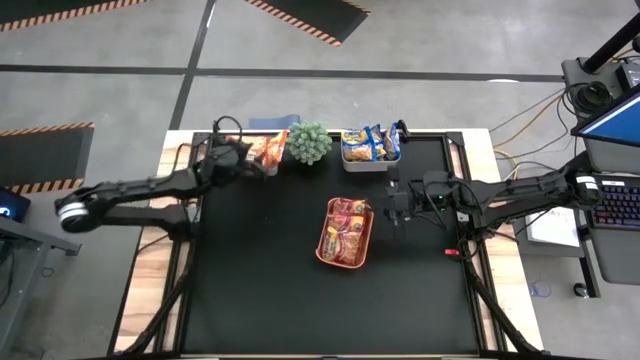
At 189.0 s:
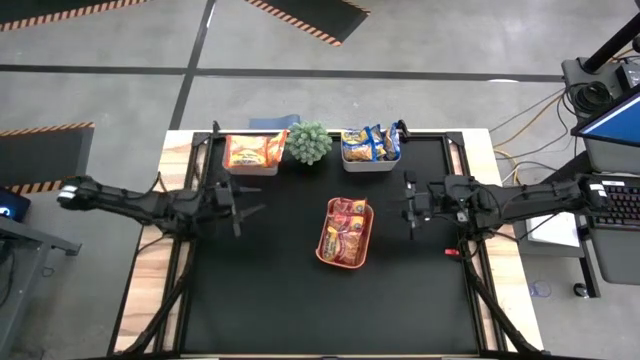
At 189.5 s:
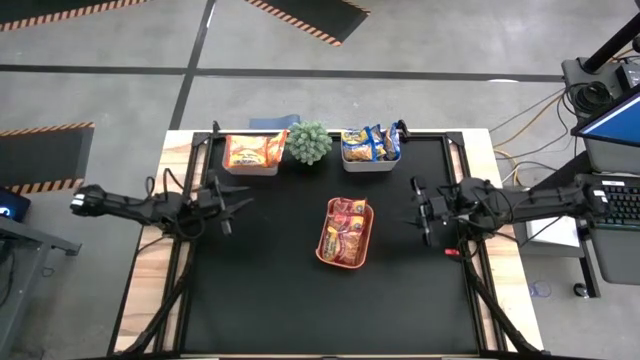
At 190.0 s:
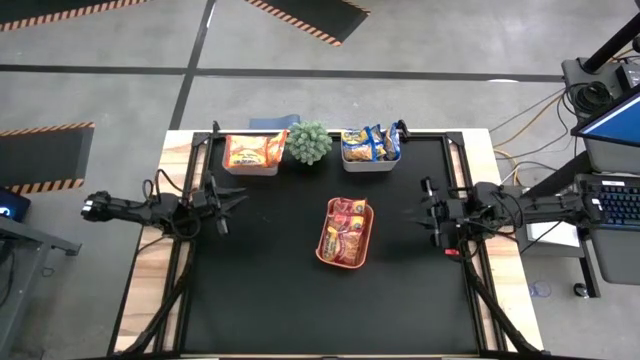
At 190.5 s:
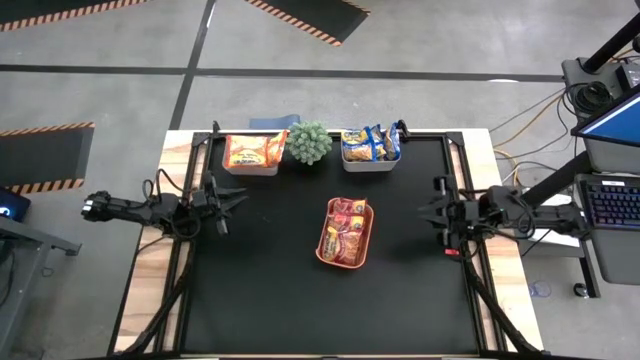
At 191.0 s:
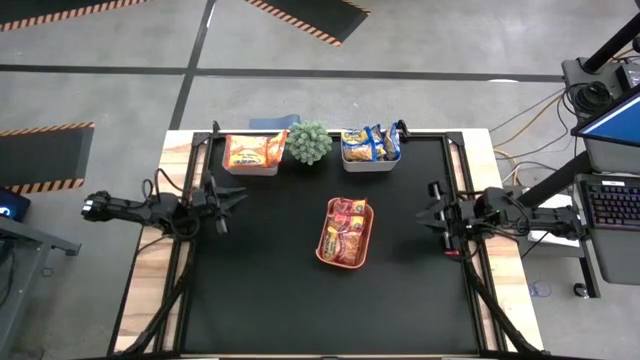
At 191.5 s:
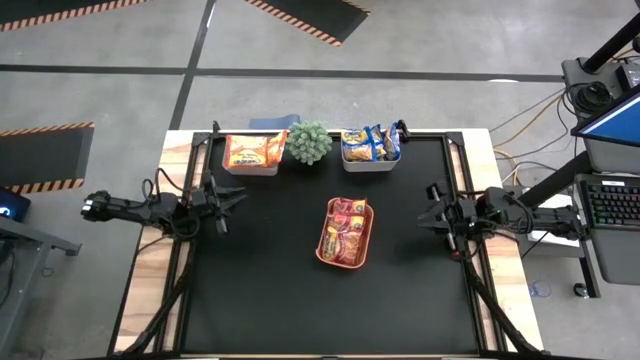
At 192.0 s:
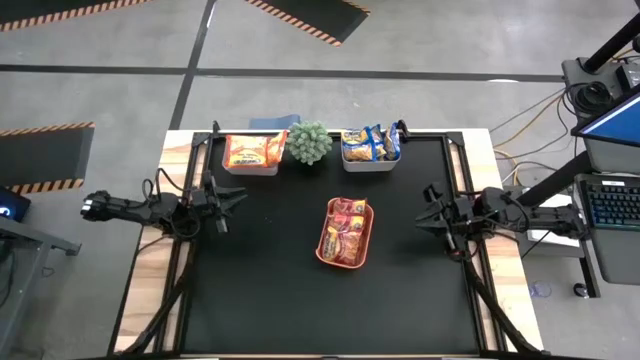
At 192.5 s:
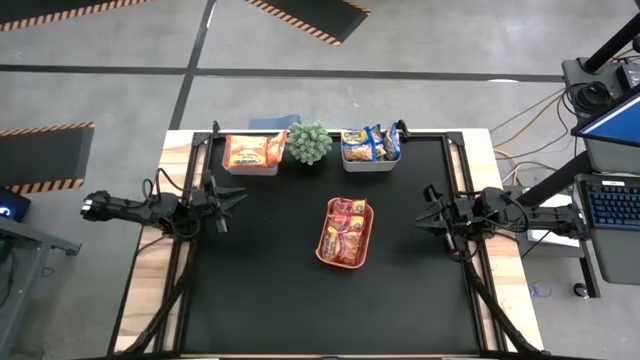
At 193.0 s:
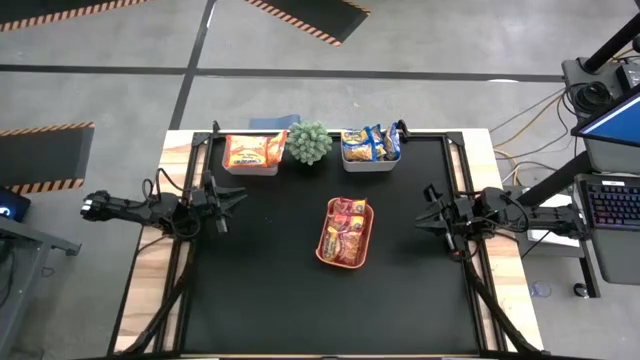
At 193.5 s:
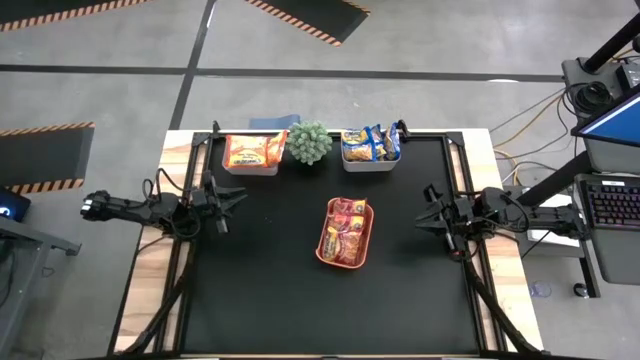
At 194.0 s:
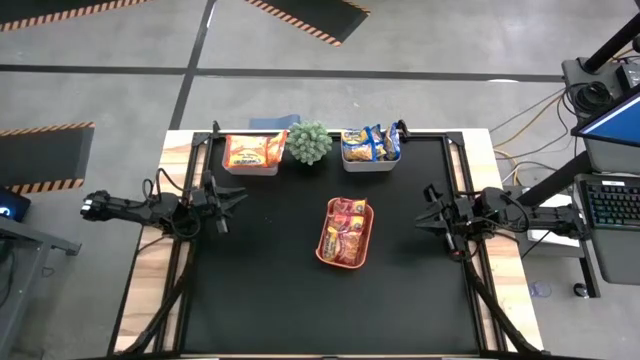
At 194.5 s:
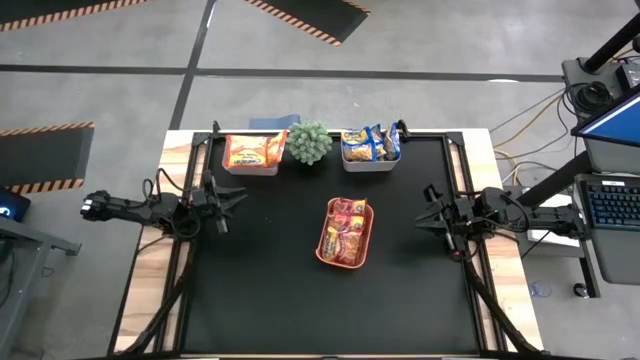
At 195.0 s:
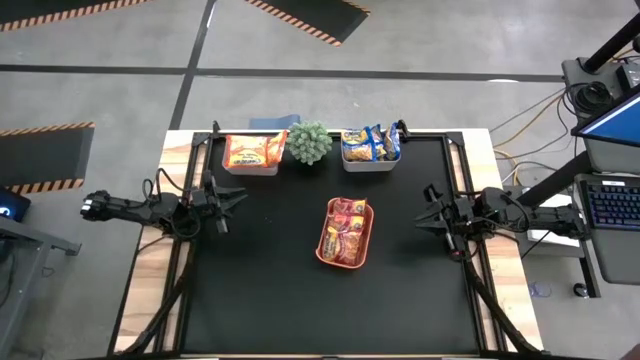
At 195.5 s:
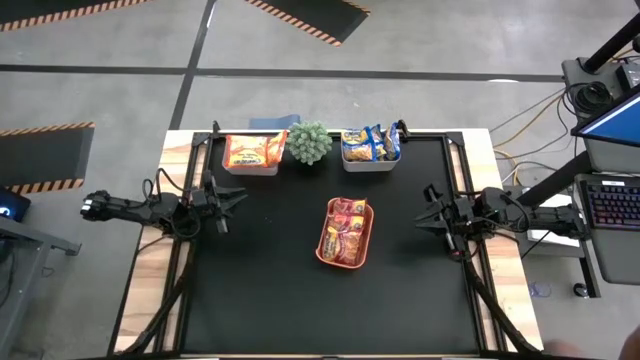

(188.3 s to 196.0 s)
Task: Sort Maruchan noodles
Return to Home Position

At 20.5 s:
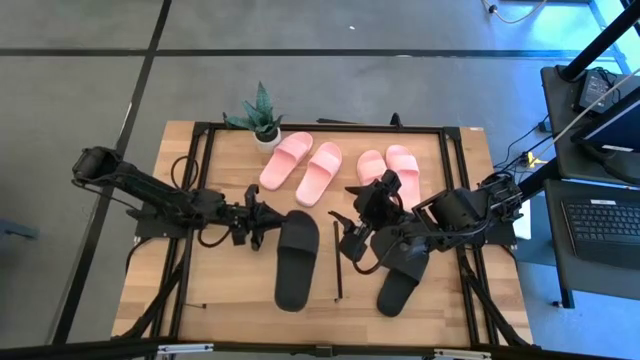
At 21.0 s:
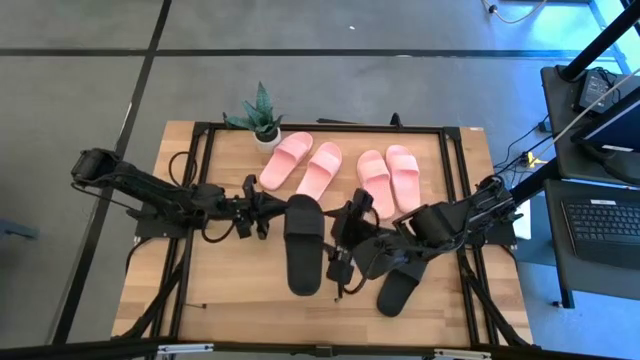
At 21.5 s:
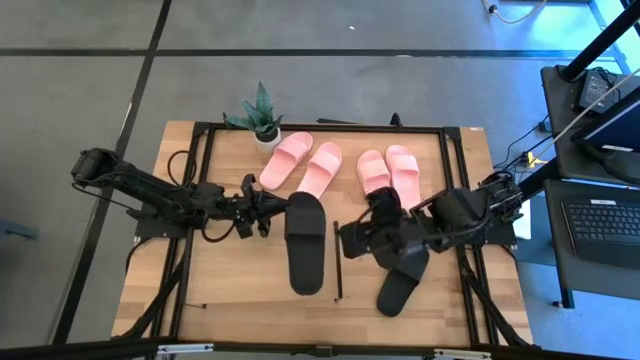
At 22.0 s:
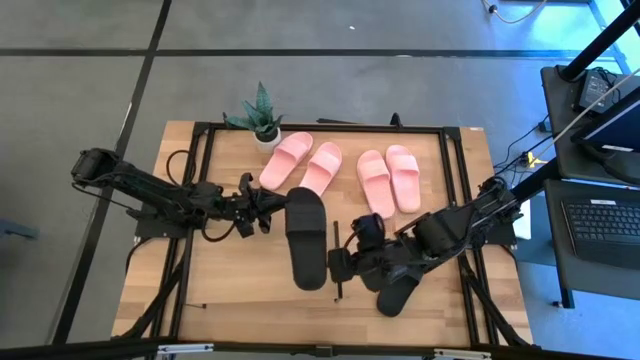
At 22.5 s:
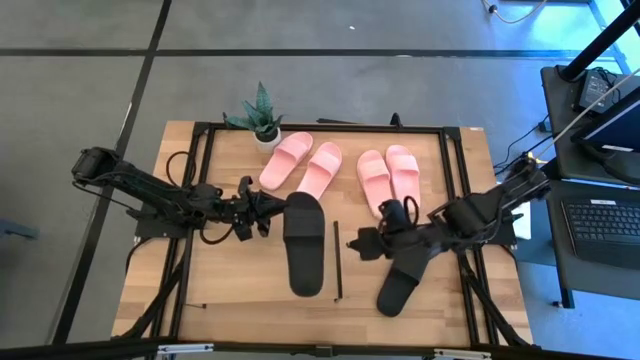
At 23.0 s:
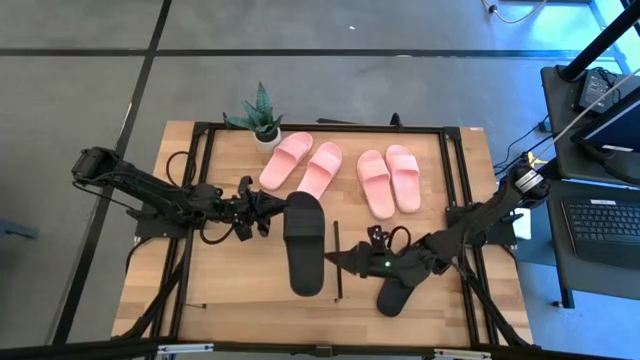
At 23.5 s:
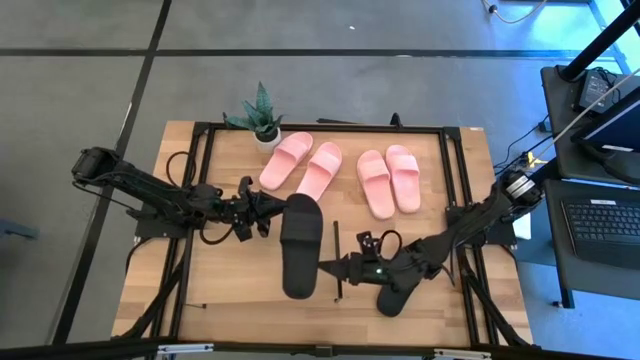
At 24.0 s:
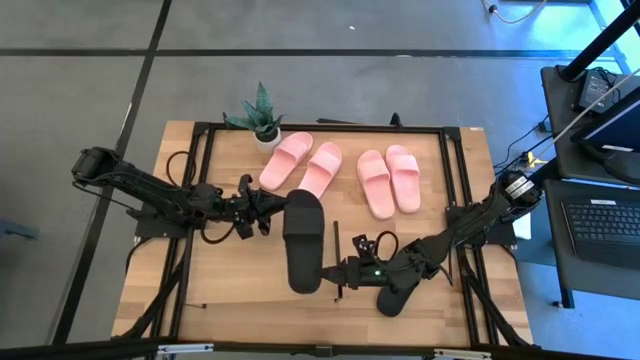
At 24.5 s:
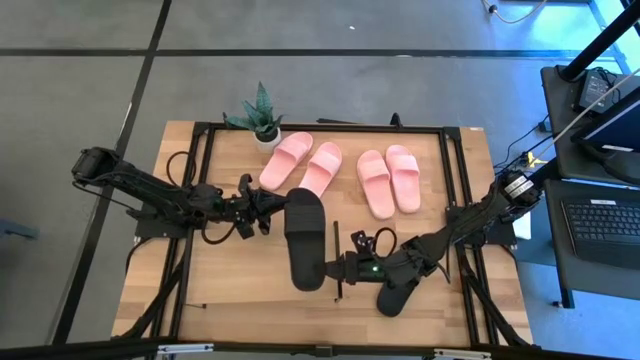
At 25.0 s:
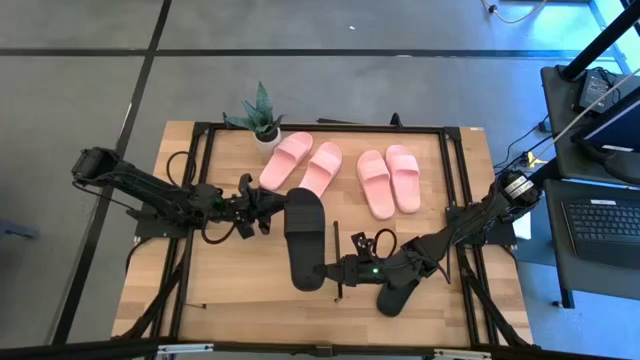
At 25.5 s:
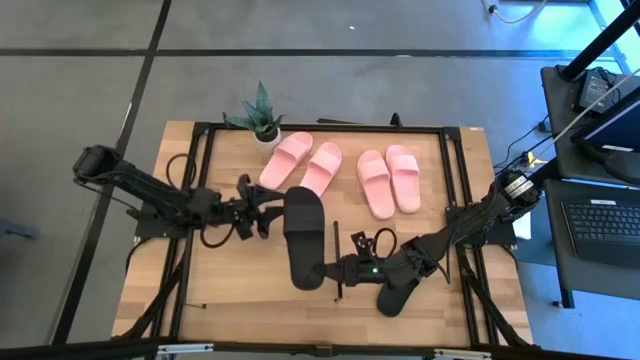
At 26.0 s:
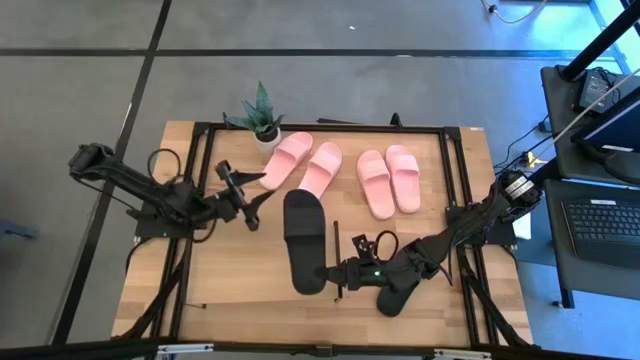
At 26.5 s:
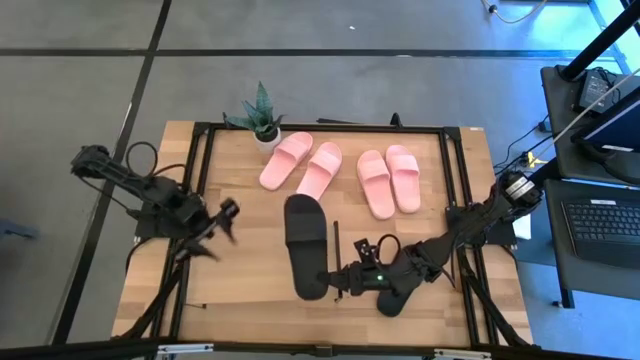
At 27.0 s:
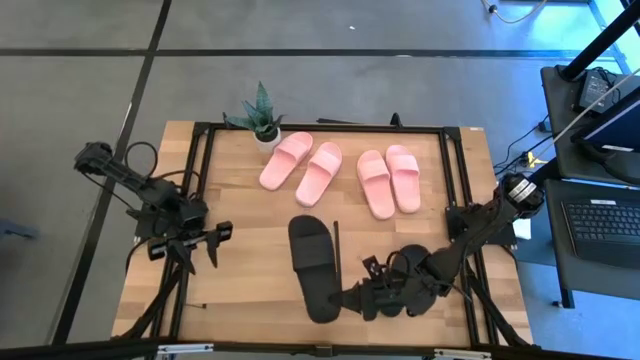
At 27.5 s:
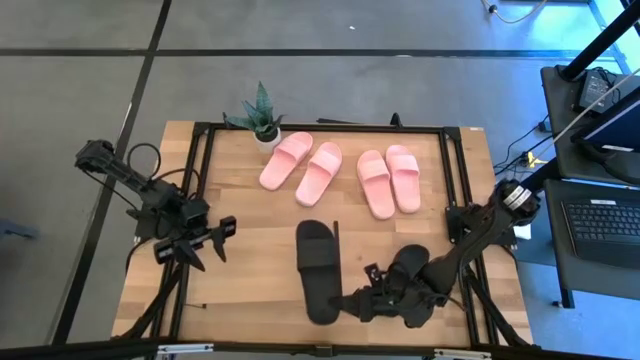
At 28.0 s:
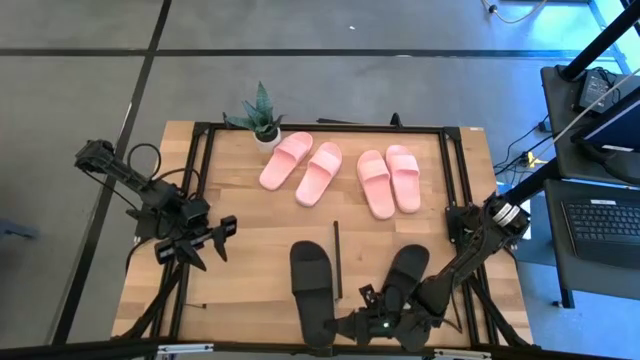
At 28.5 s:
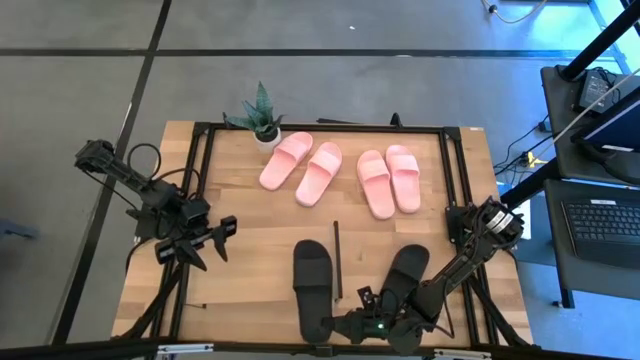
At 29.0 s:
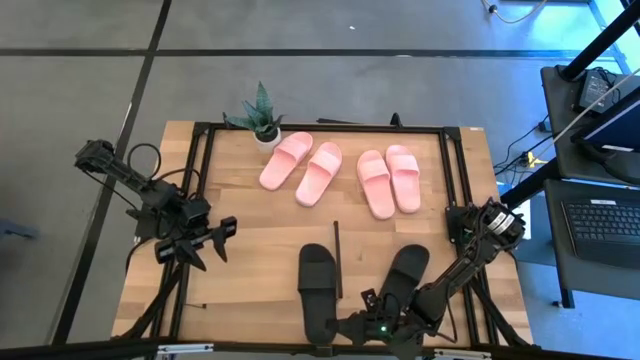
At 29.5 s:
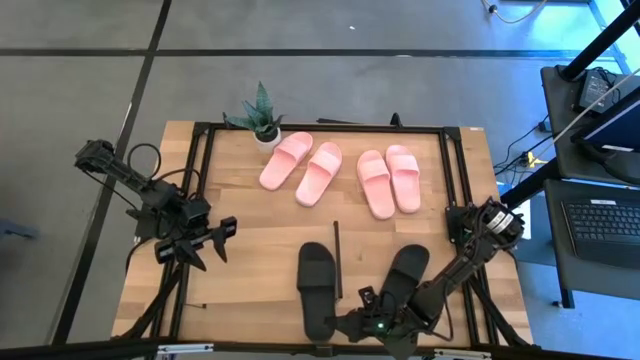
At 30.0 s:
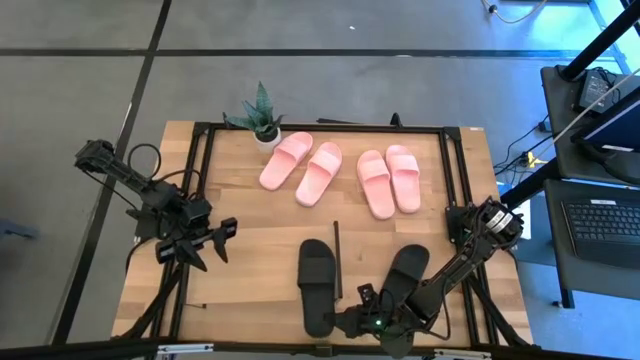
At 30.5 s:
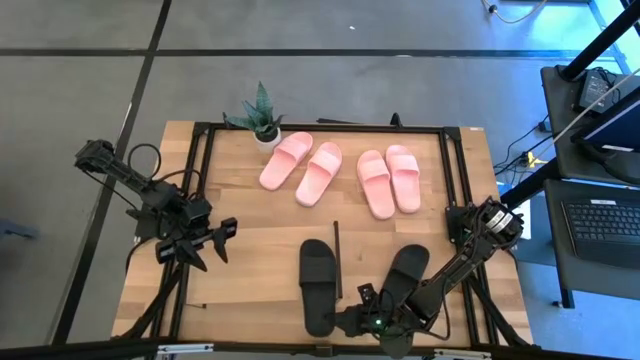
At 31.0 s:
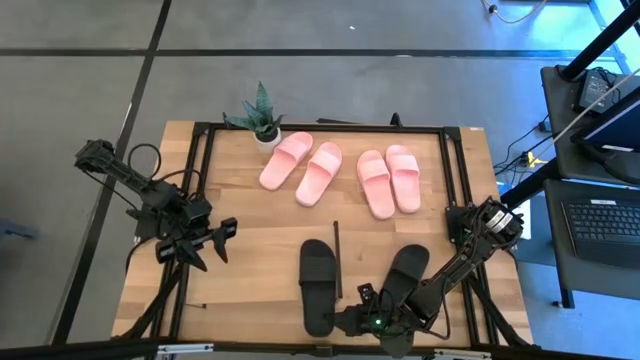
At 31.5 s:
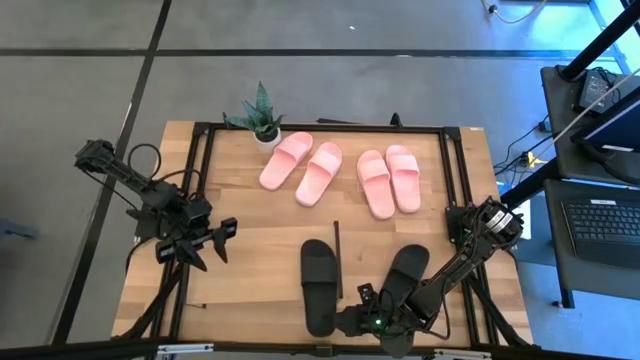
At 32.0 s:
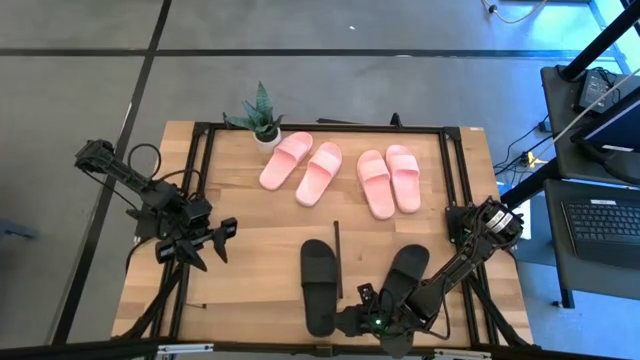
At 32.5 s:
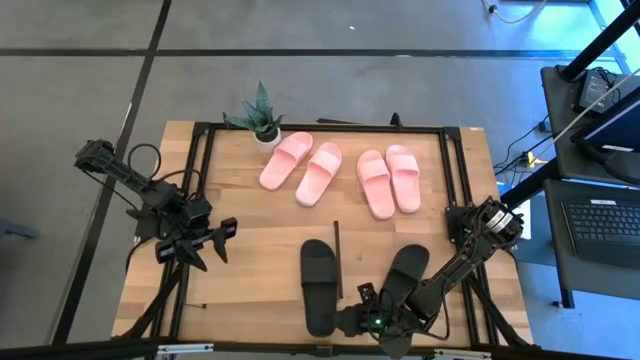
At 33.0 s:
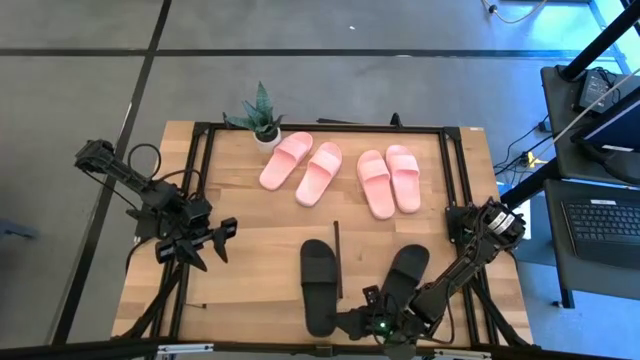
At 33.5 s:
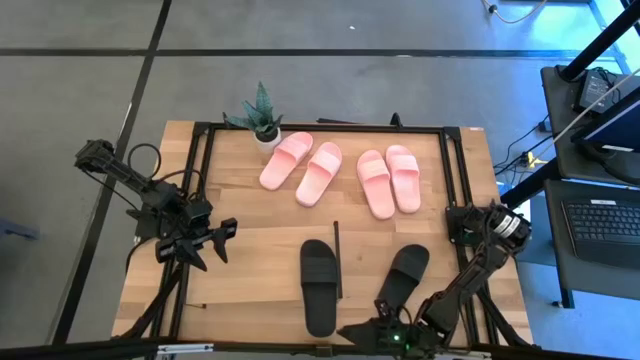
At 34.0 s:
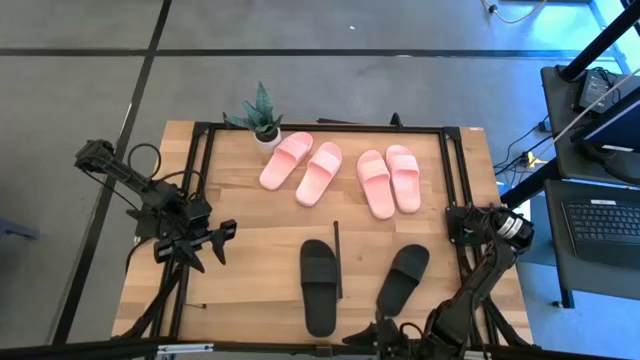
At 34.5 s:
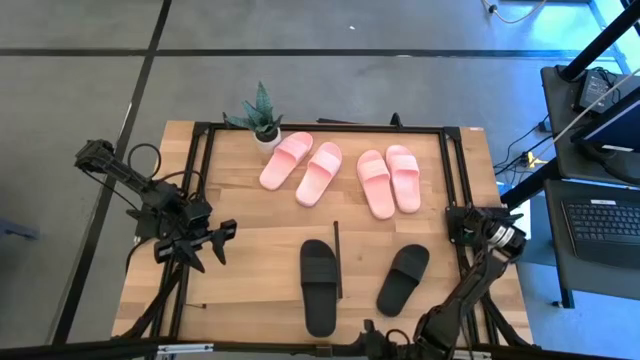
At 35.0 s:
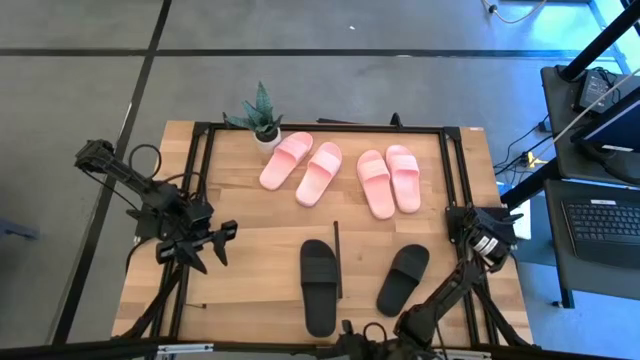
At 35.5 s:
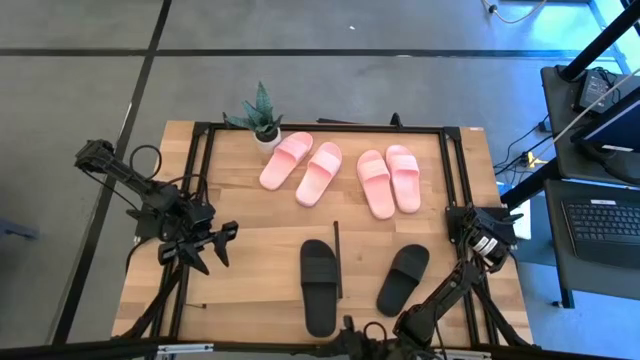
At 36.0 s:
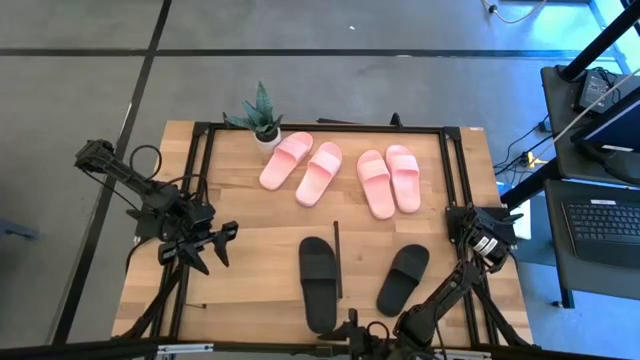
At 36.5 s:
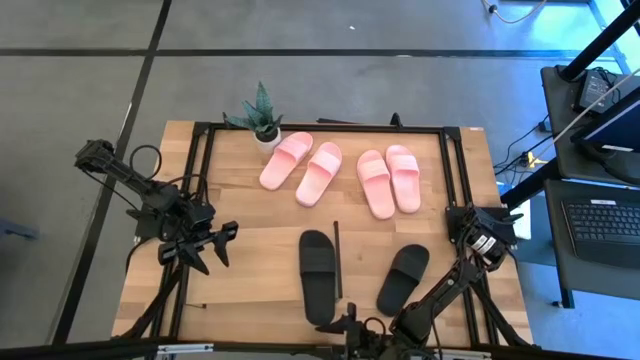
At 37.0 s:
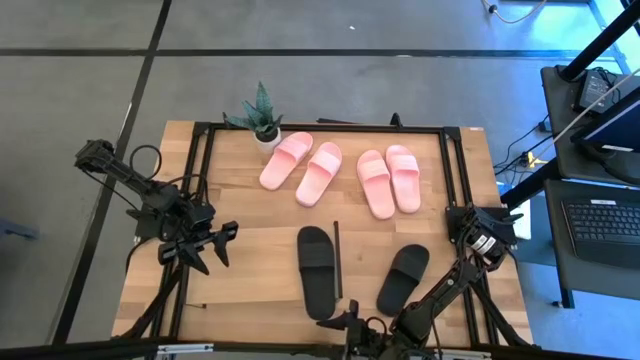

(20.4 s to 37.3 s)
Task: Pick and place slides into the shelf
Put the black slide on the shelf
